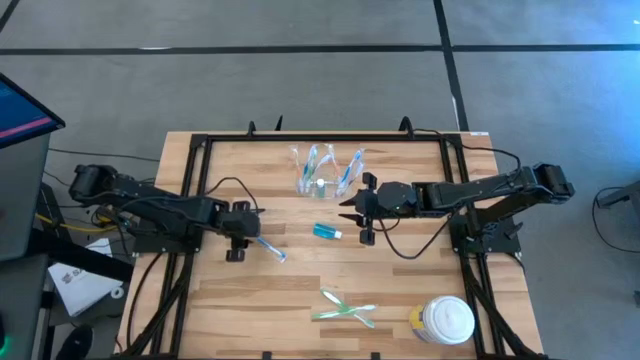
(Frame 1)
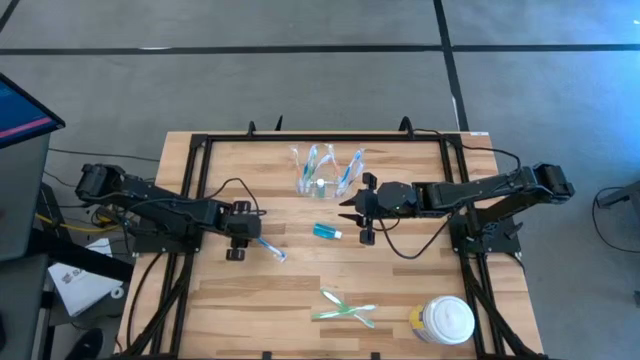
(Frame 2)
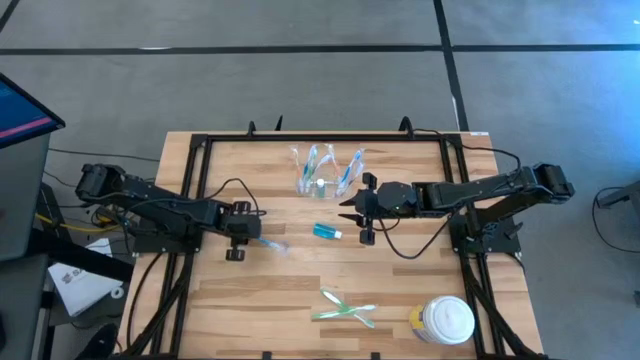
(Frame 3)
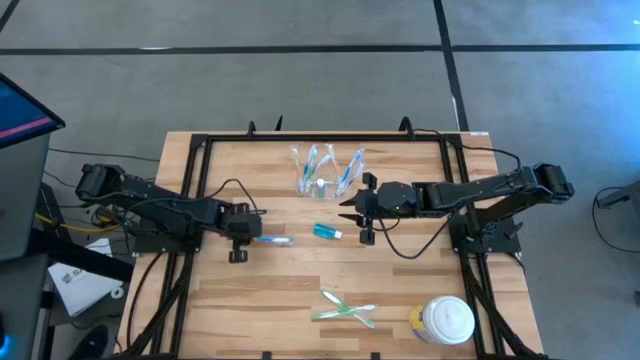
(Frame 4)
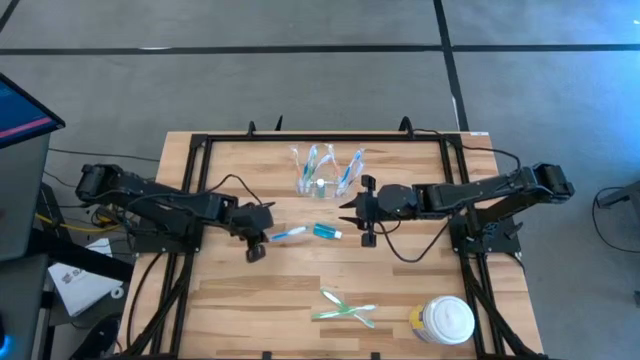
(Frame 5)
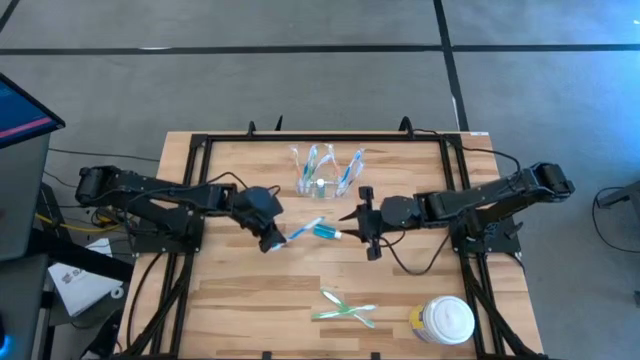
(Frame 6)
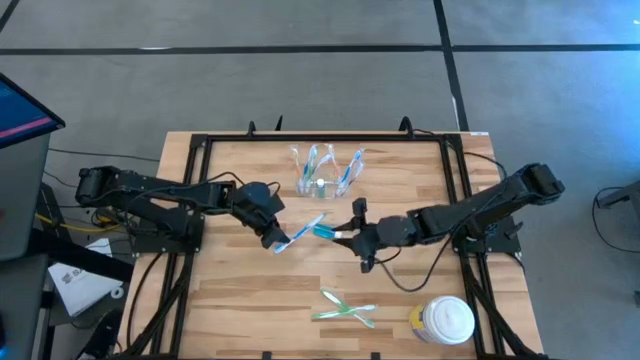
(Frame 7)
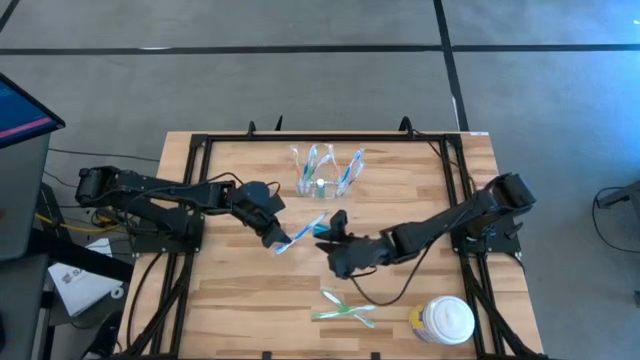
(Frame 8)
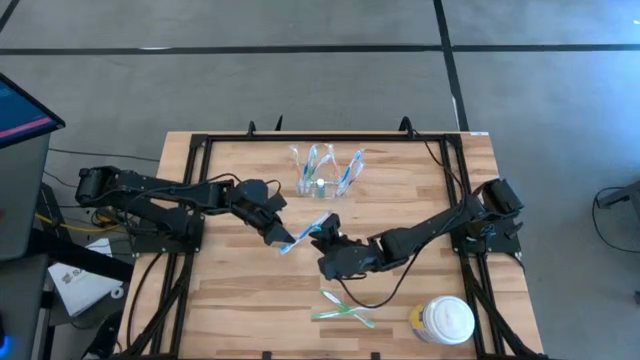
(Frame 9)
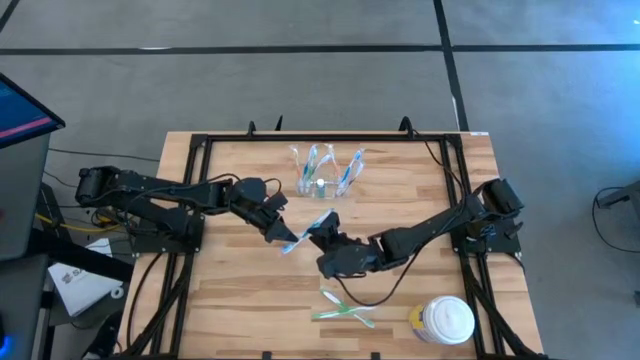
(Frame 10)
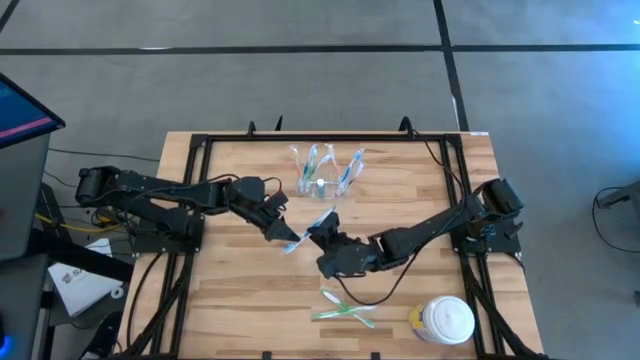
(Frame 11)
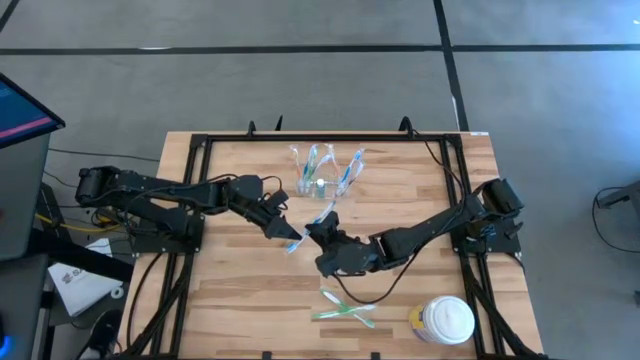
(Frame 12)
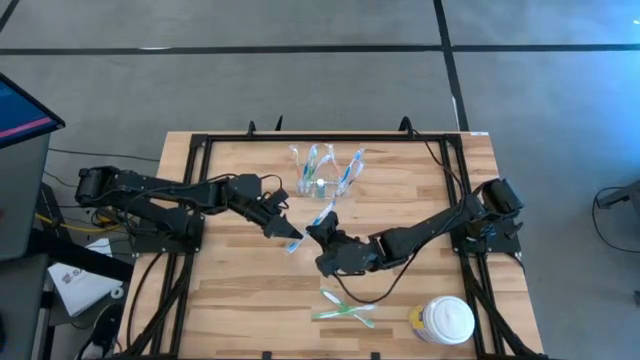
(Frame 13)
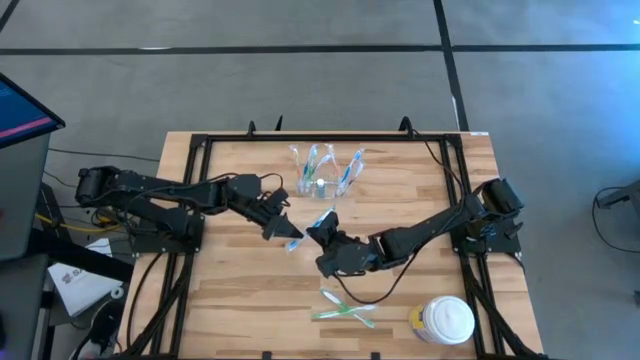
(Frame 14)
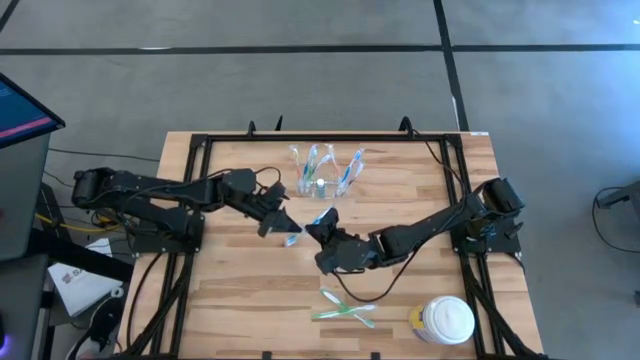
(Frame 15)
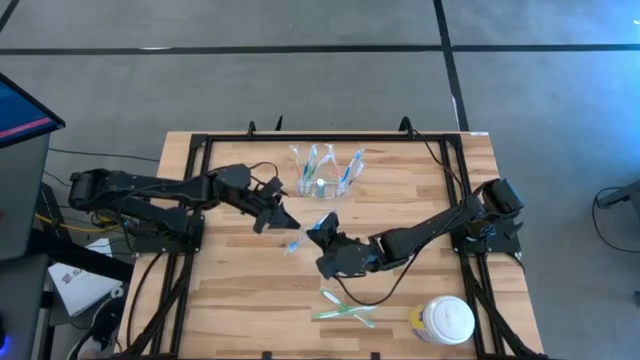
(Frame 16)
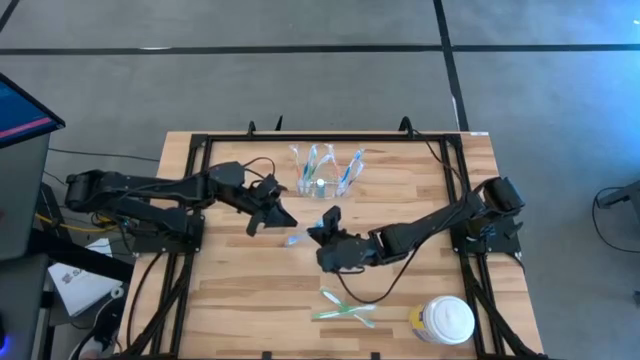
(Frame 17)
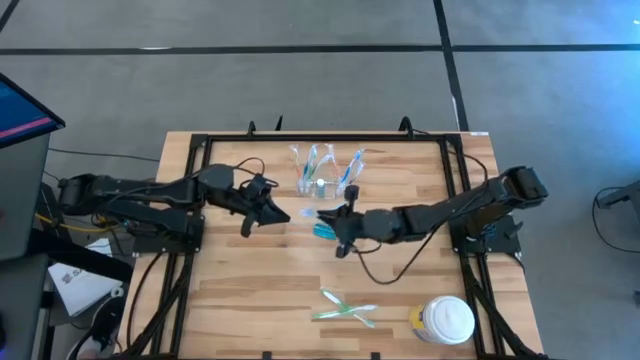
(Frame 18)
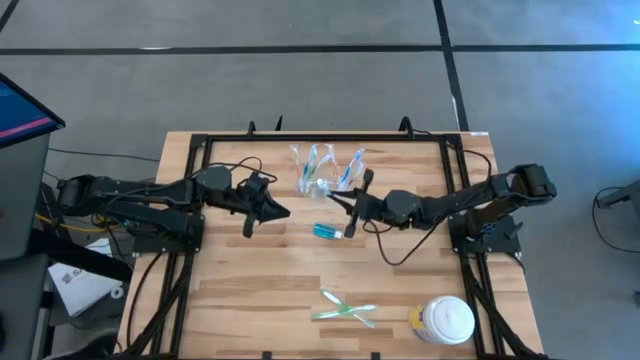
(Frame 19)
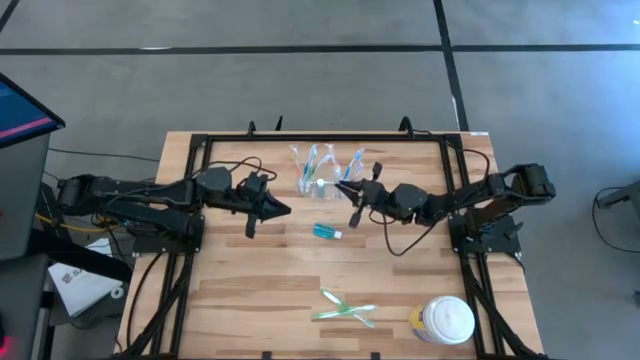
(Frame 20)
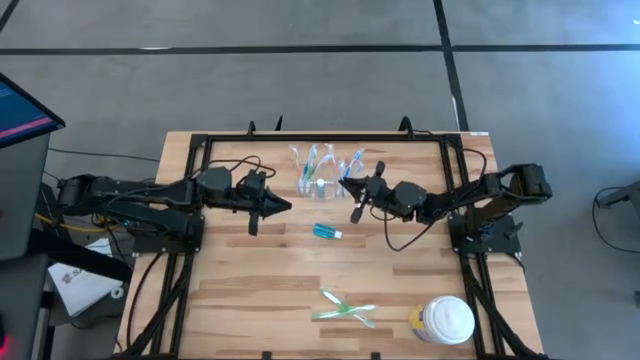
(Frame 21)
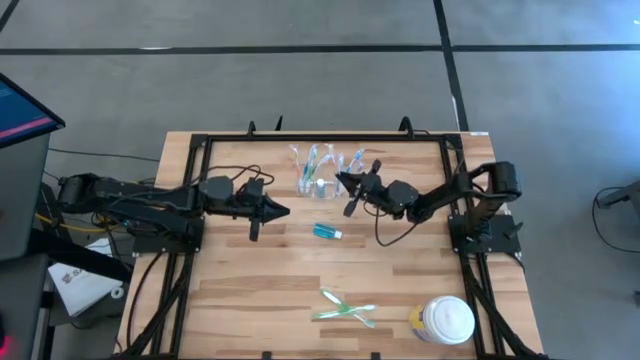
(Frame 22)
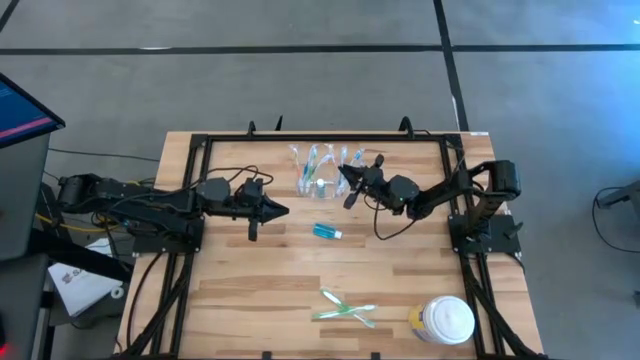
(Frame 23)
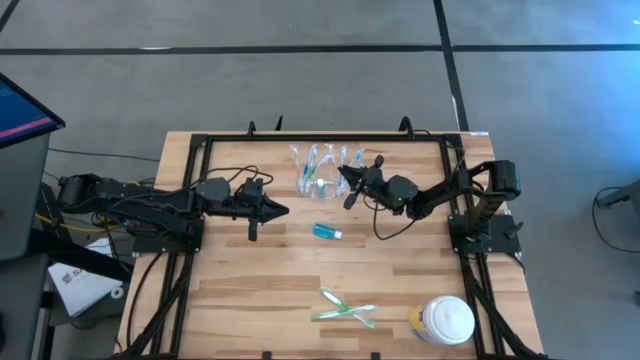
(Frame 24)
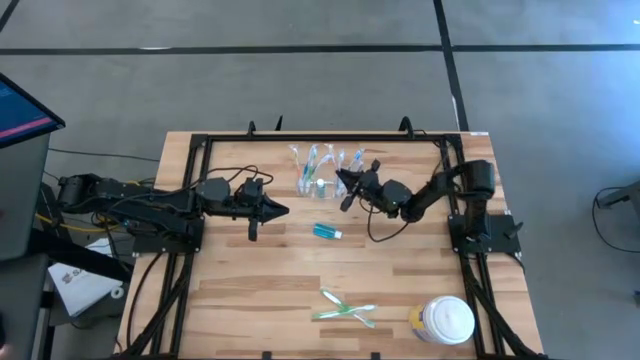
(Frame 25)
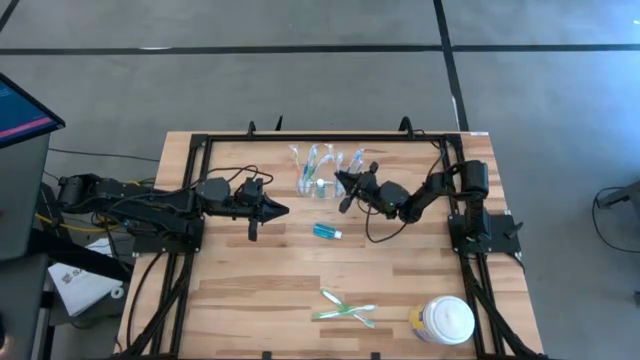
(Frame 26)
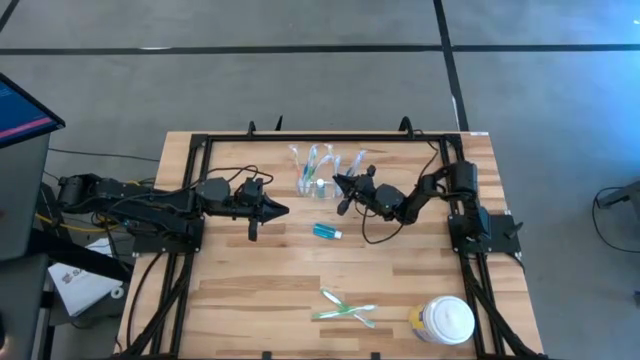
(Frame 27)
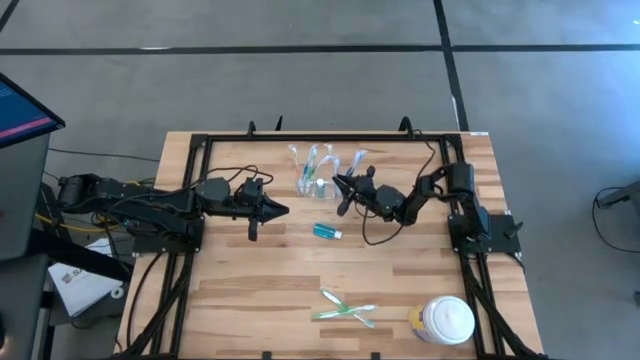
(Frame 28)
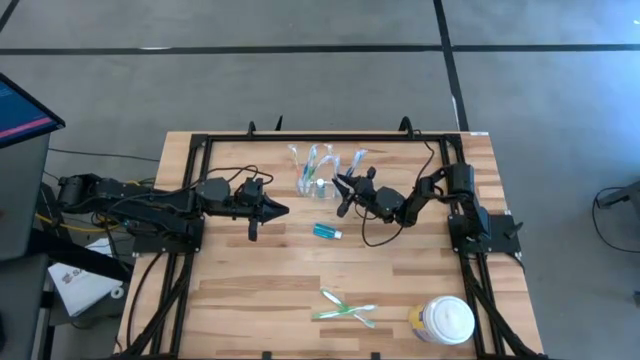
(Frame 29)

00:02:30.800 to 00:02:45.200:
Task: Pick & Place toothbrushing station
Put the blue toothbrush into the transparent organizer
